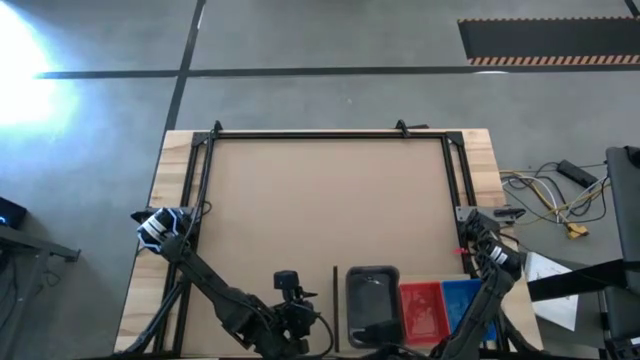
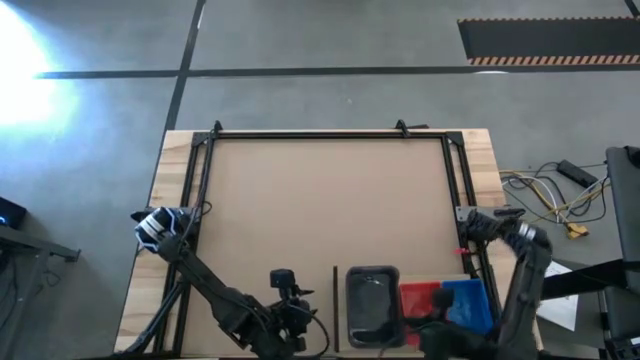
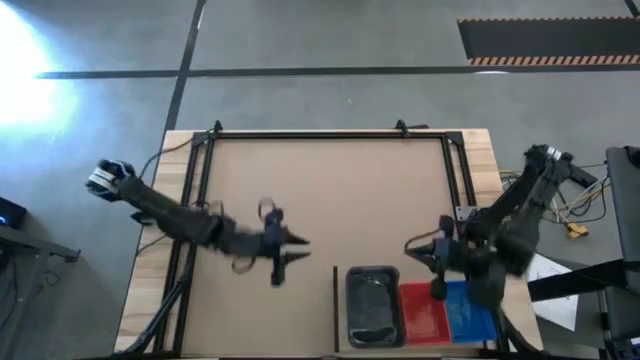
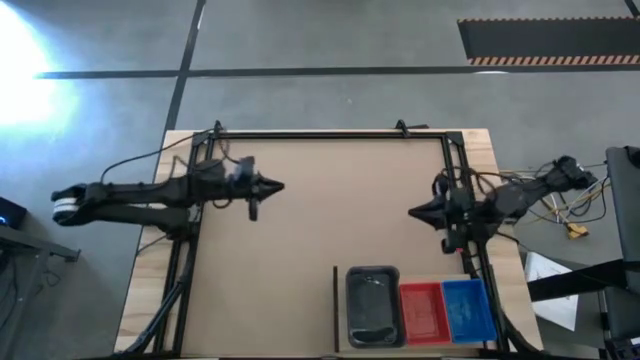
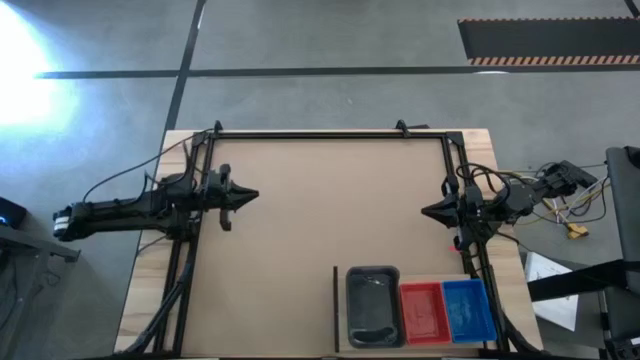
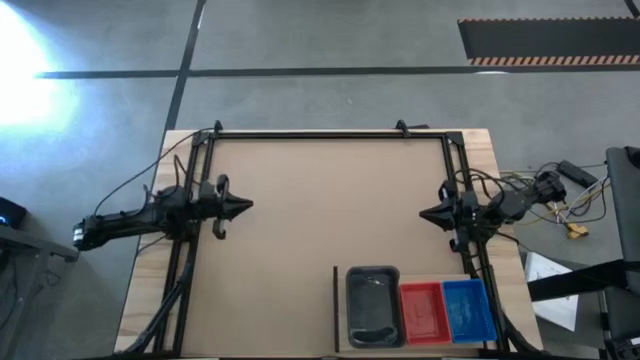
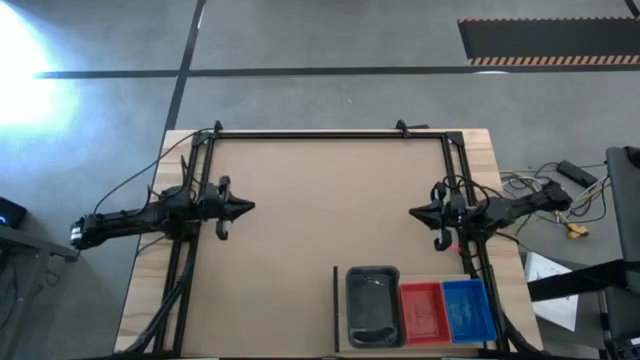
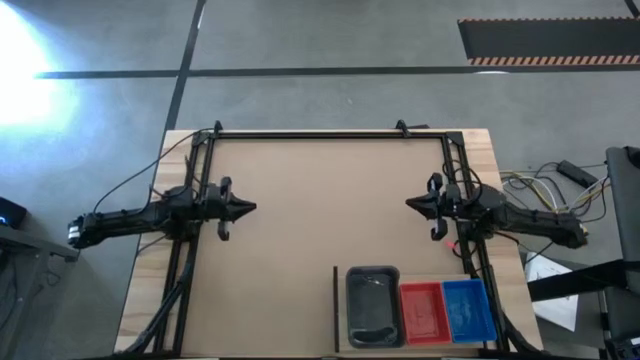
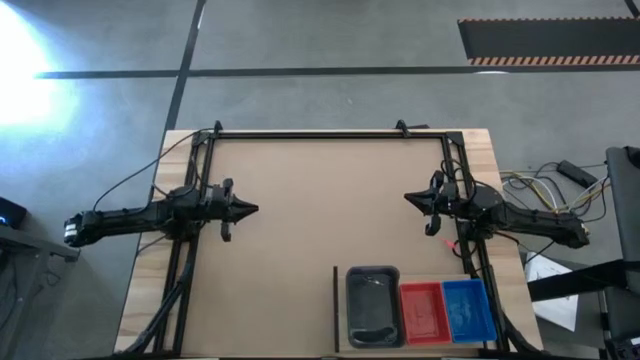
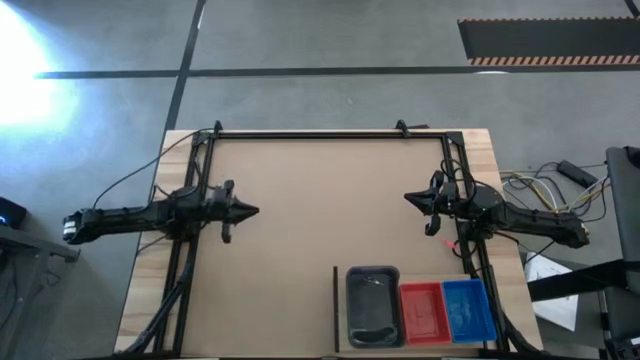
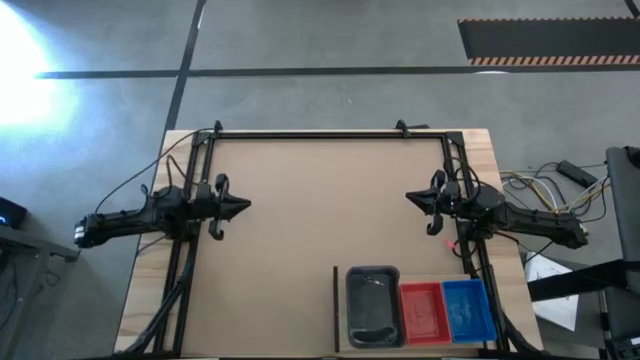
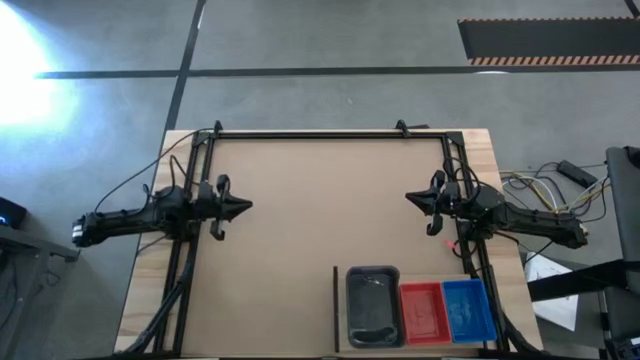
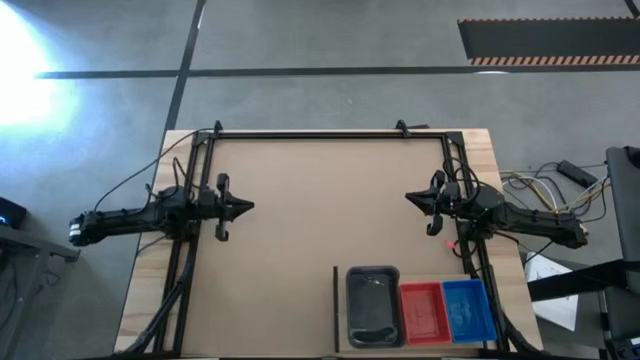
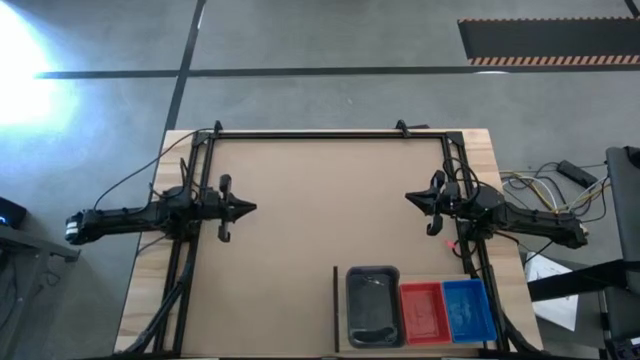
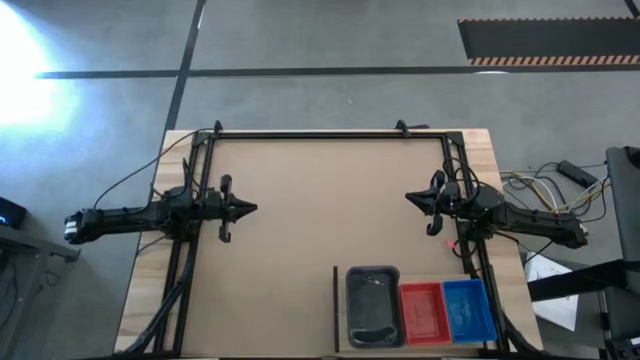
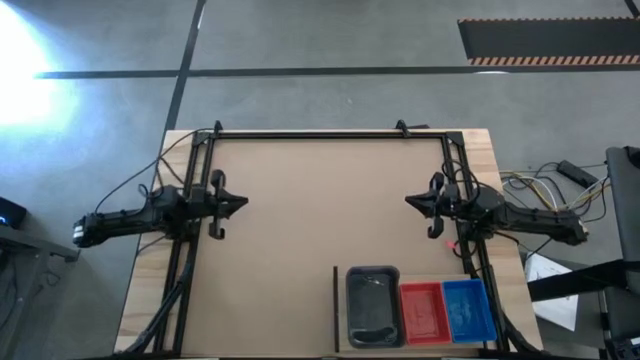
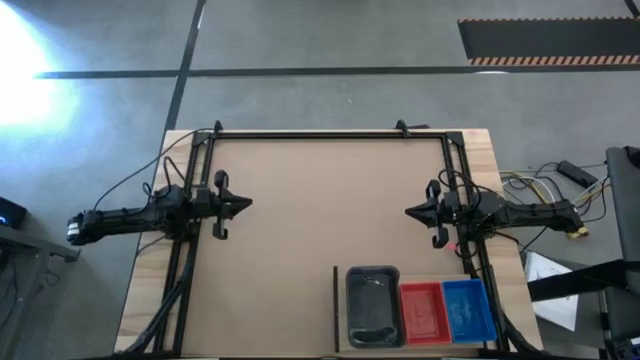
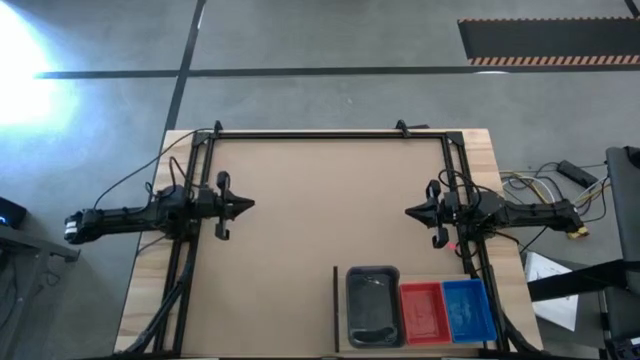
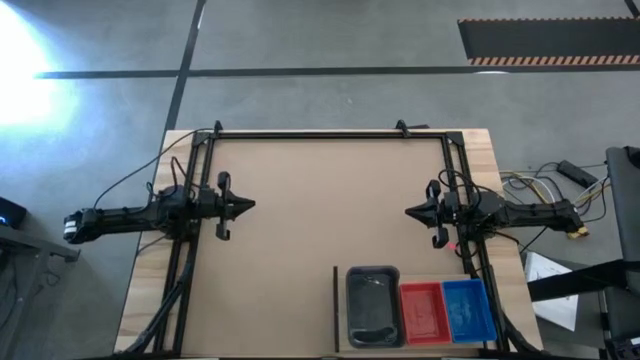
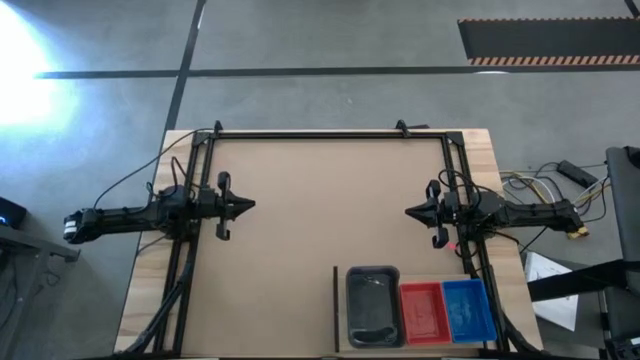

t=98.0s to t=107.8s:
Task: Stack baskets on shelf by color
Return to Home Position

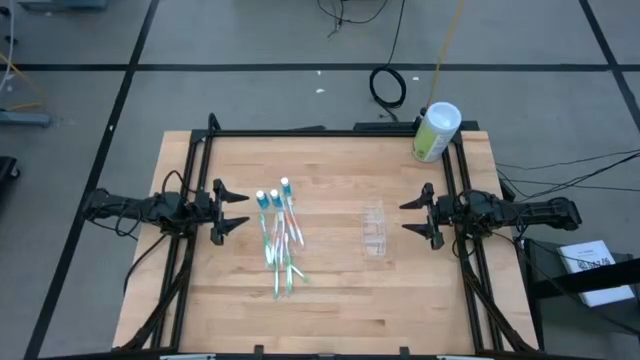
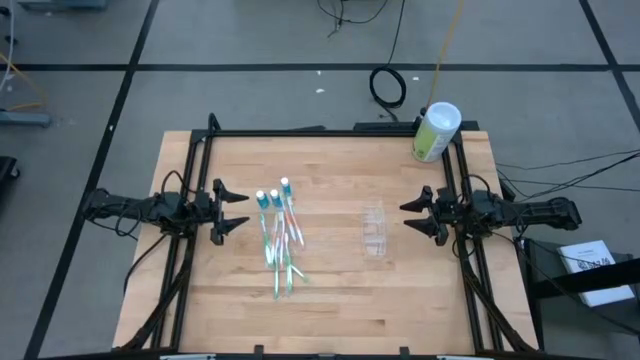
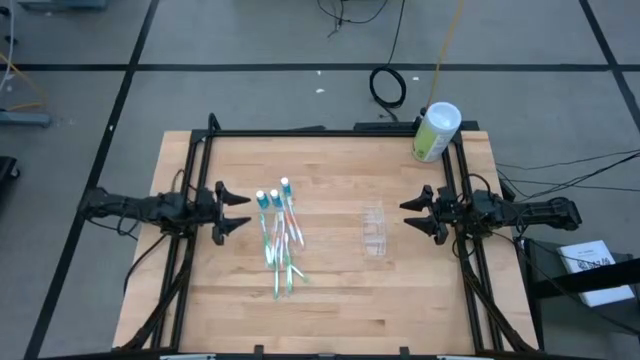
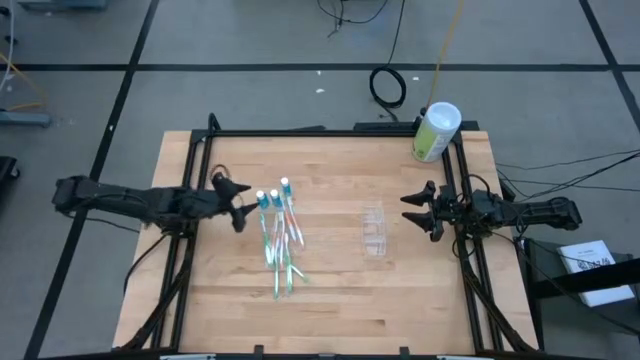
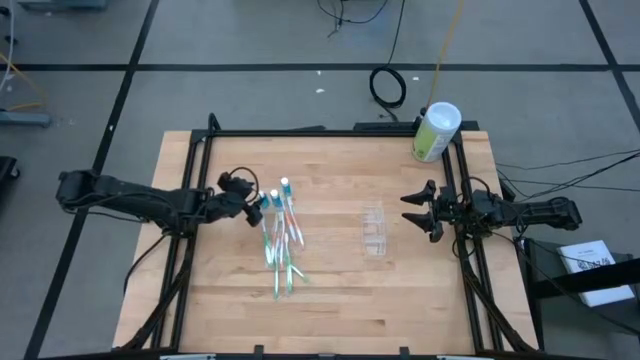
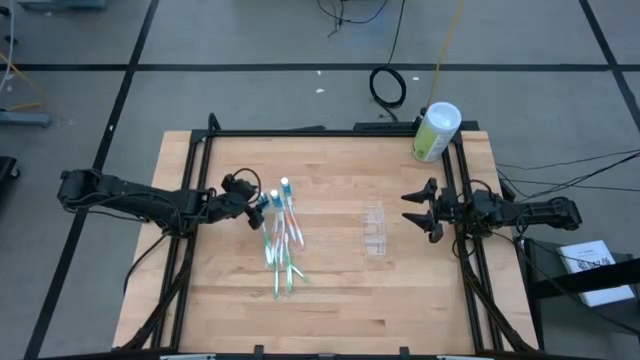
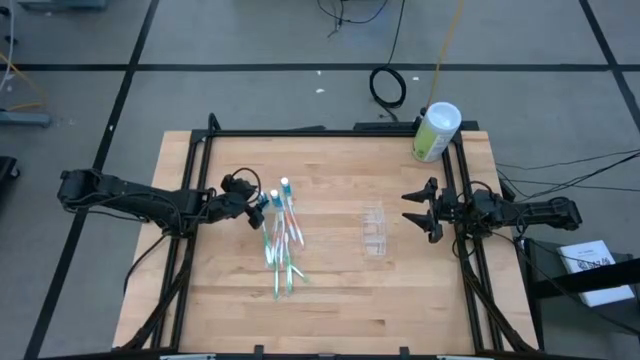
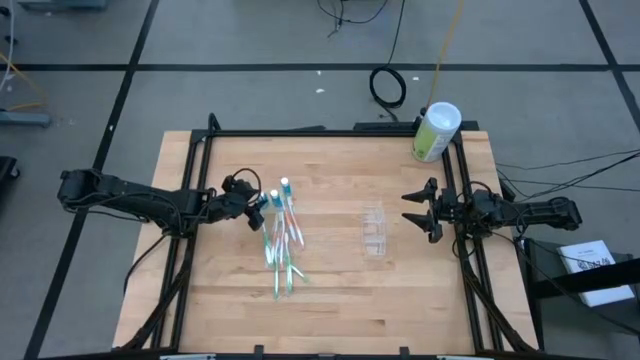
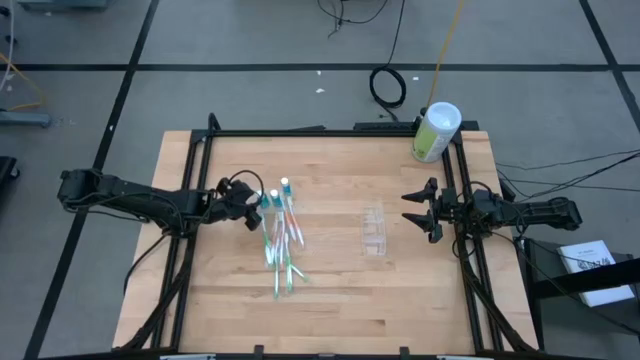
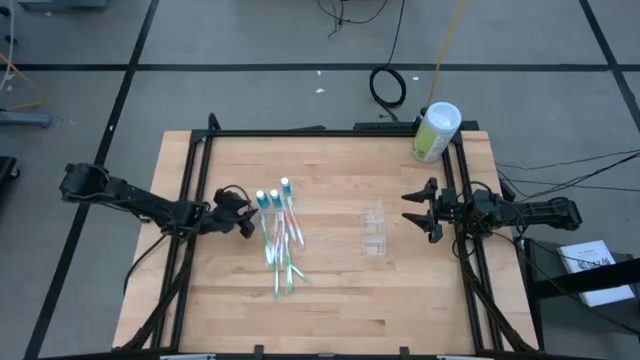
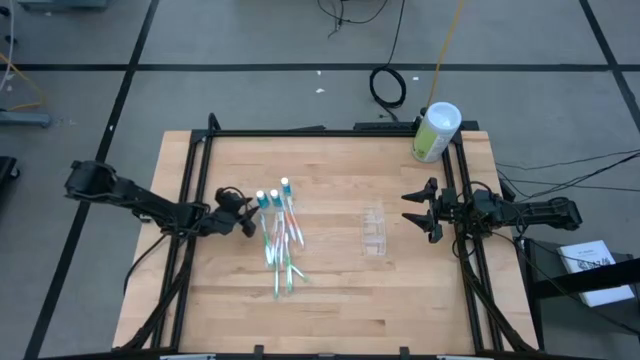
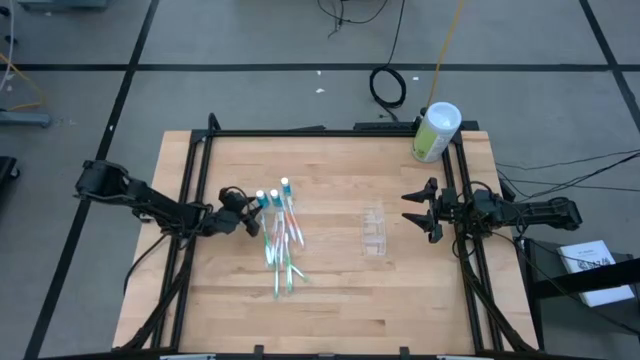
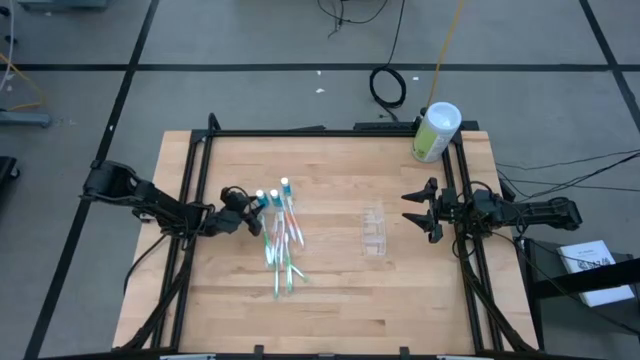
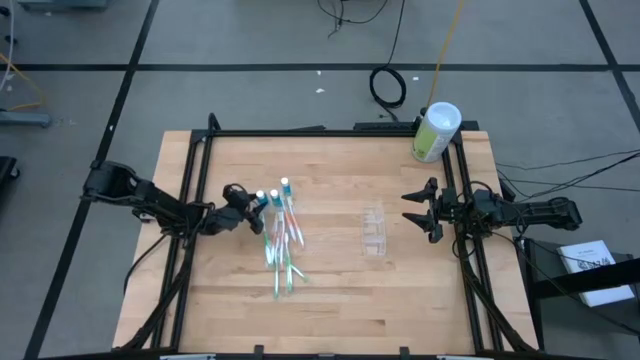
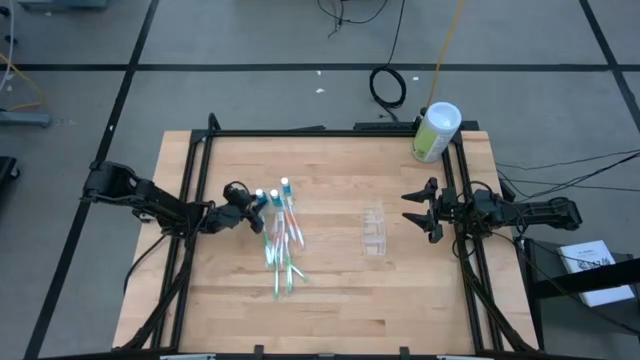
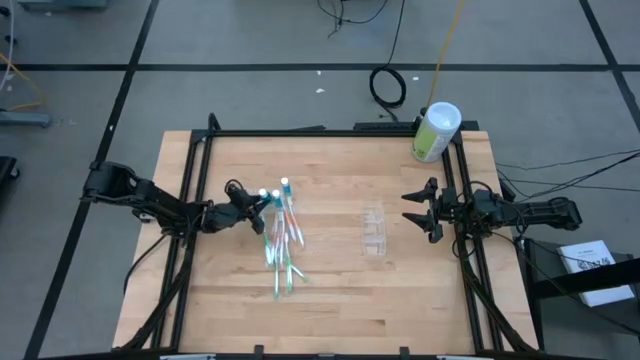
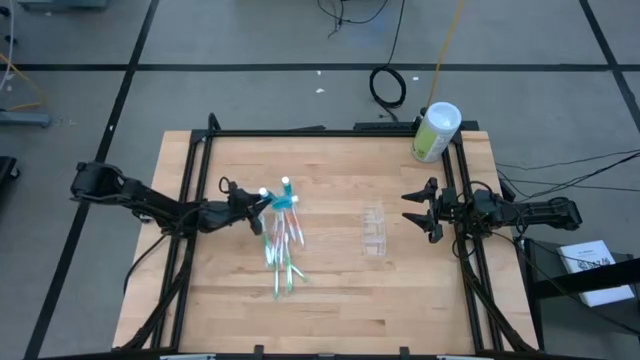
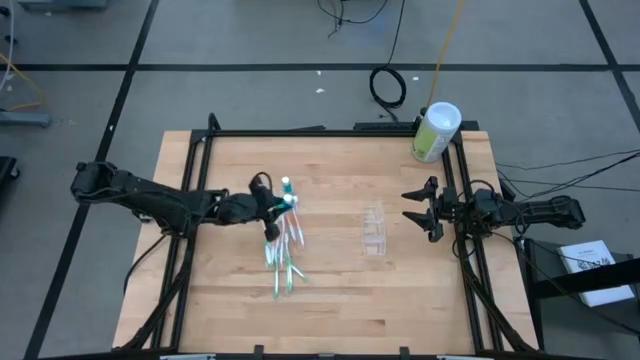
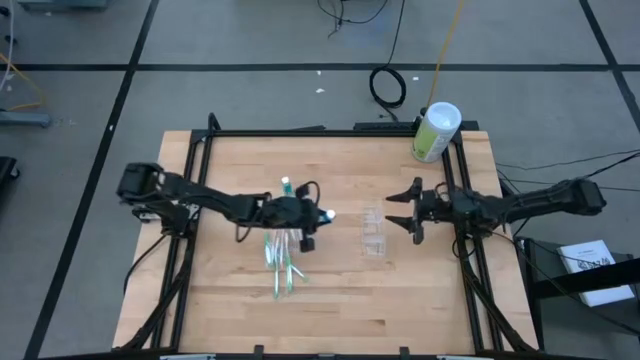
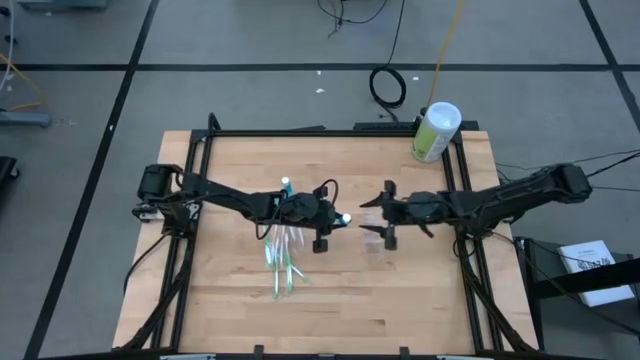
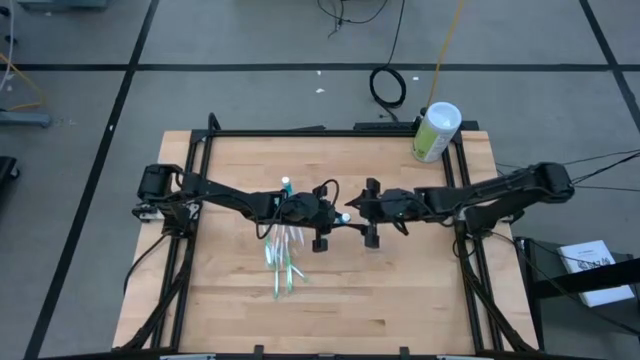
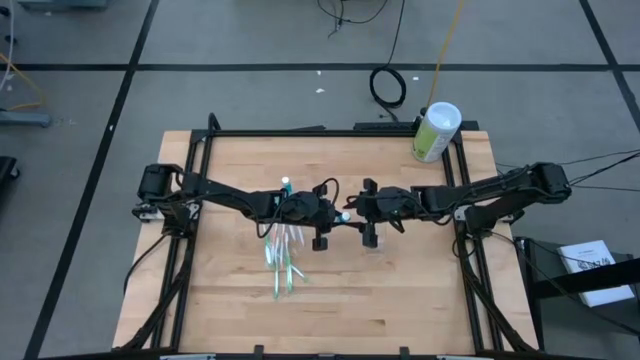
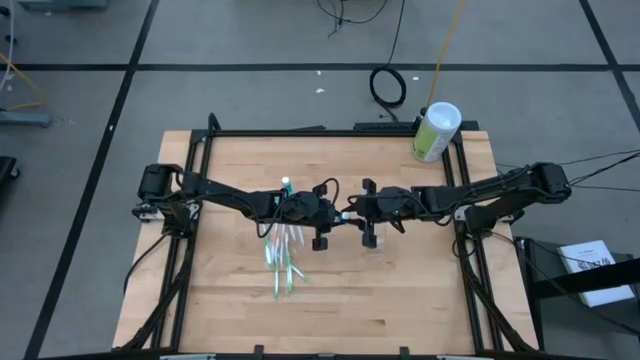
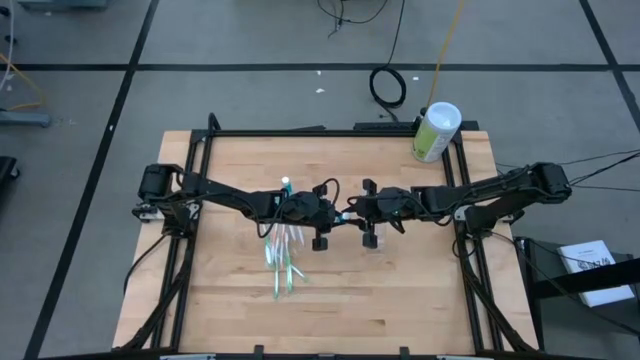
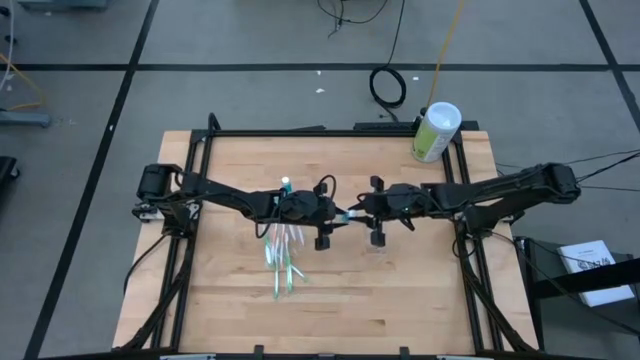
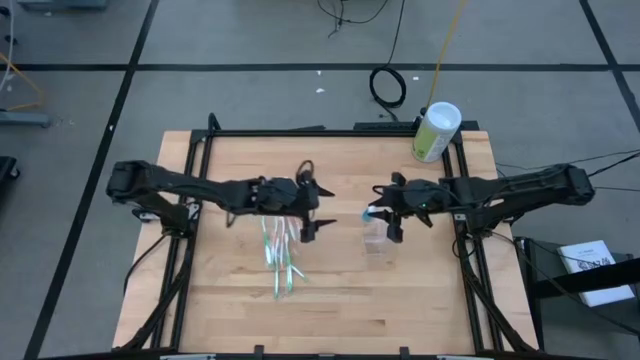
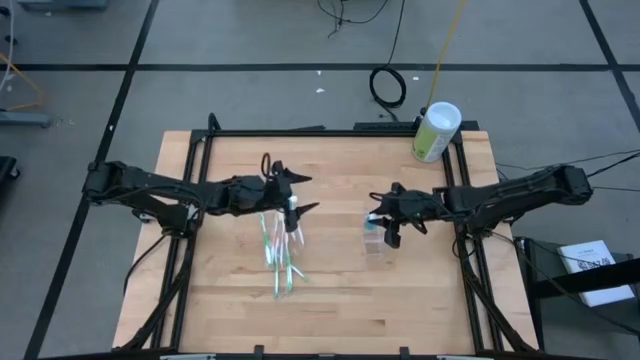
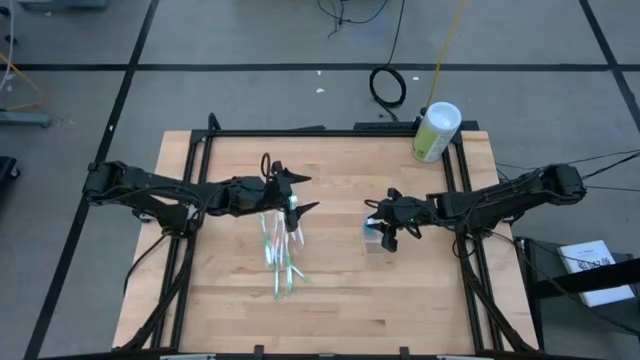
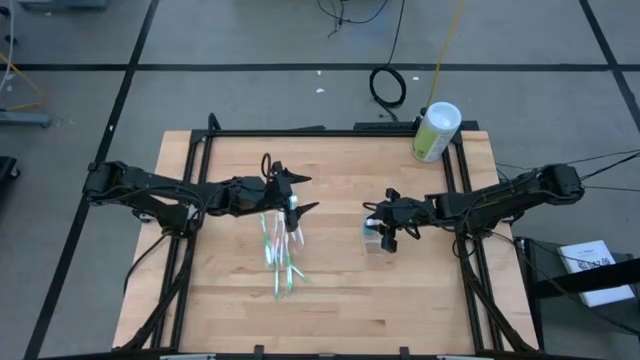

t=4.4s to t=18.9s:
Task: Pick & Place toothbrushing station
Put the blue mouthwash into the middle of the transparent organizer
